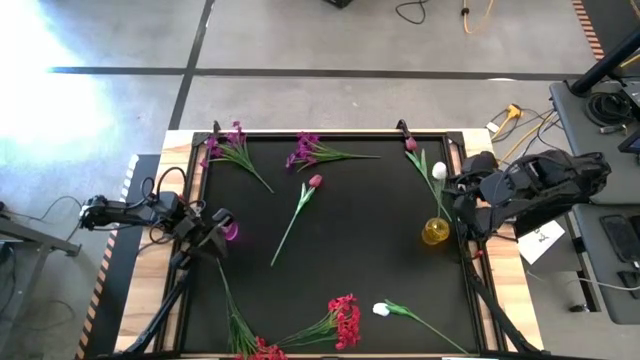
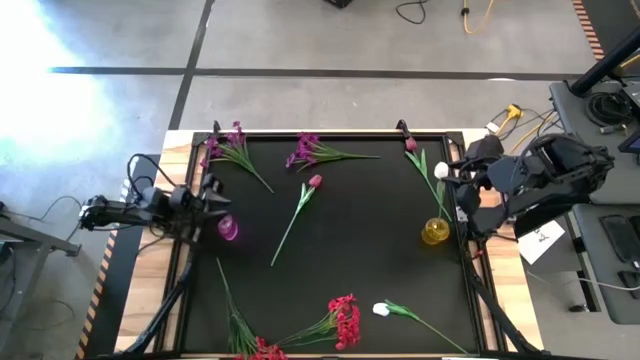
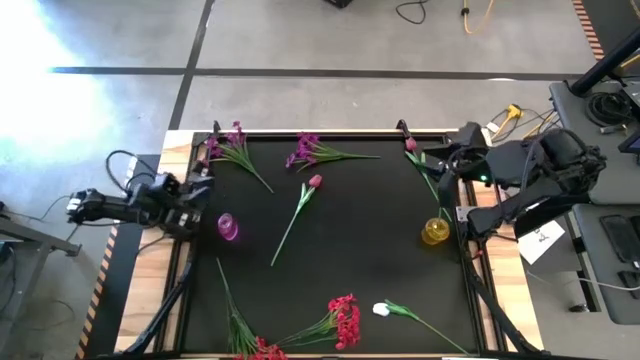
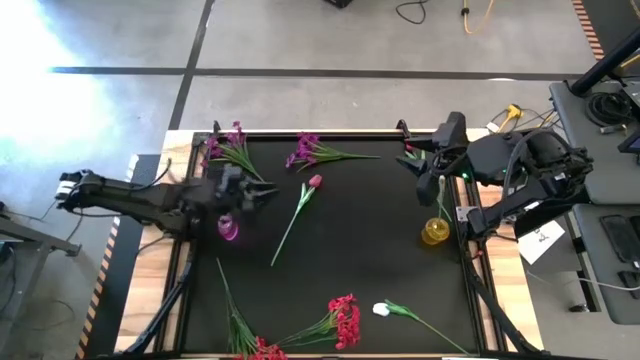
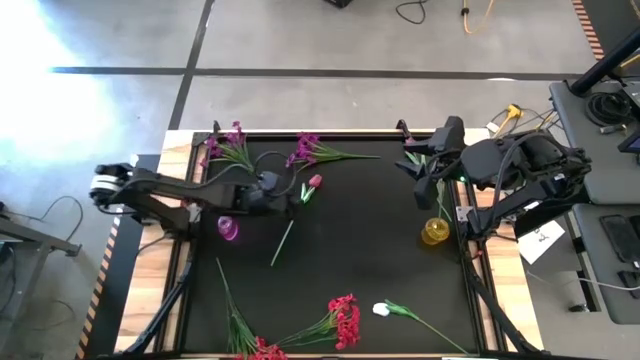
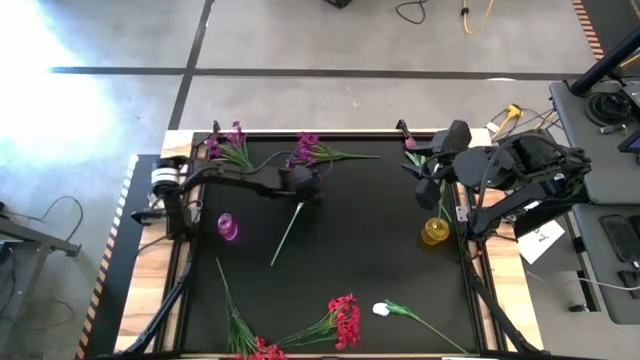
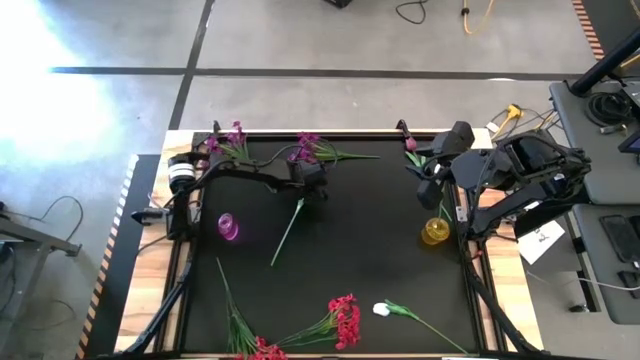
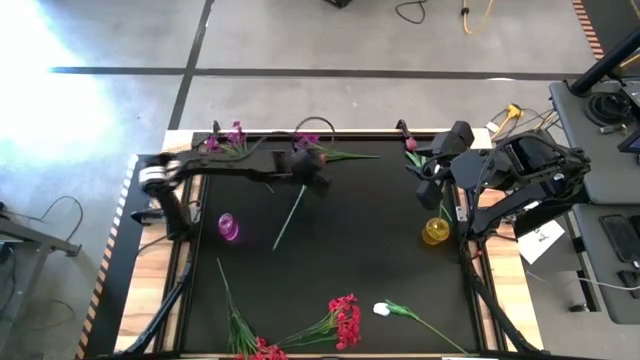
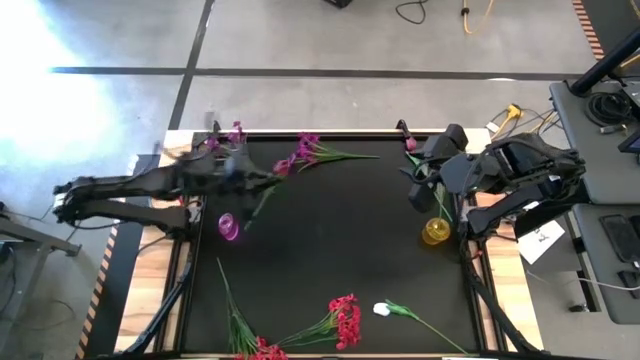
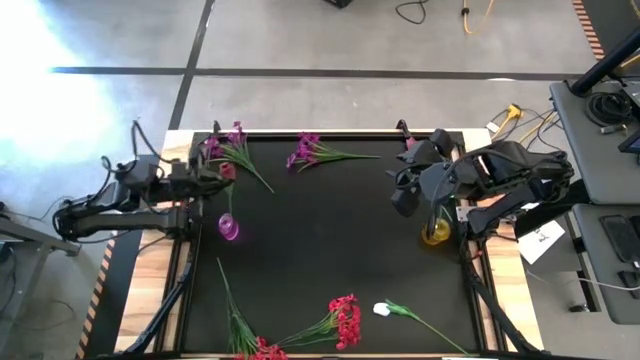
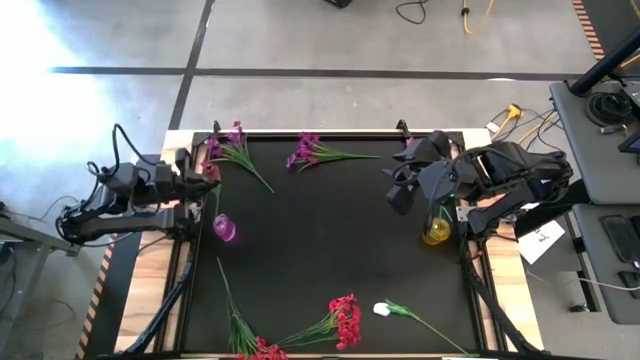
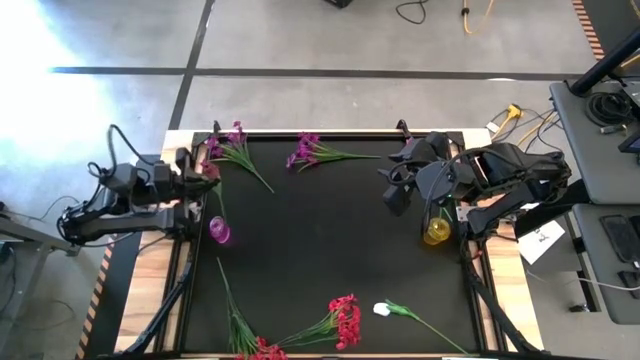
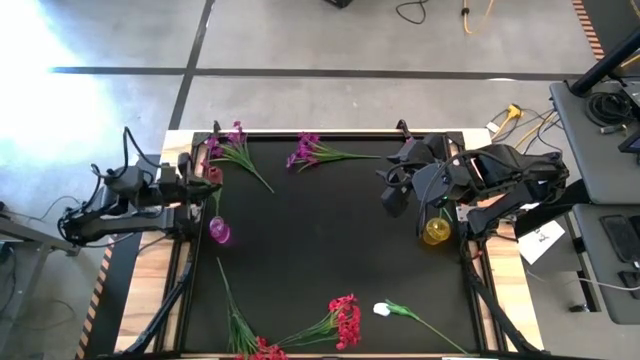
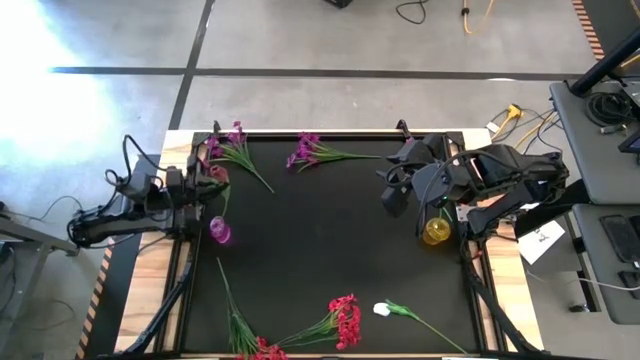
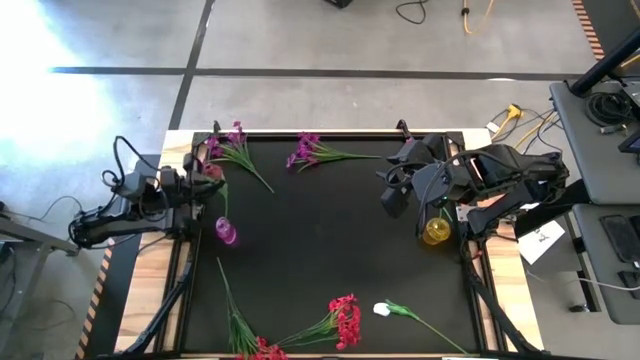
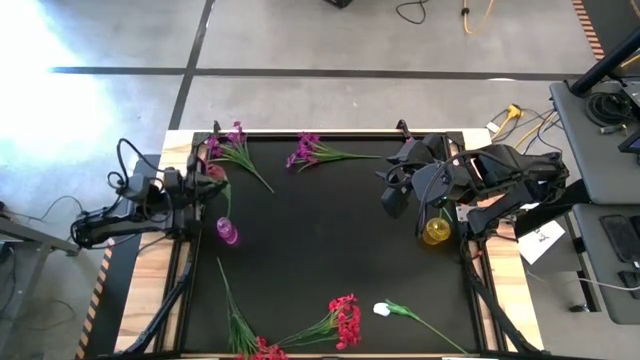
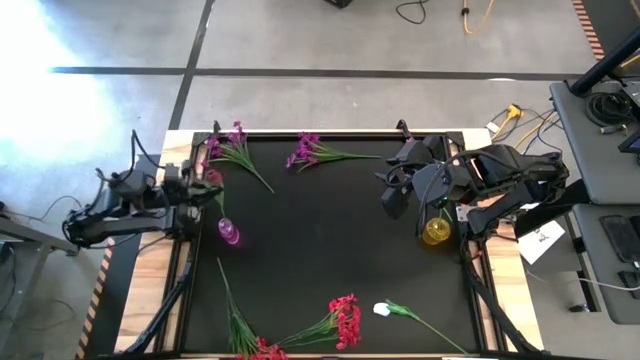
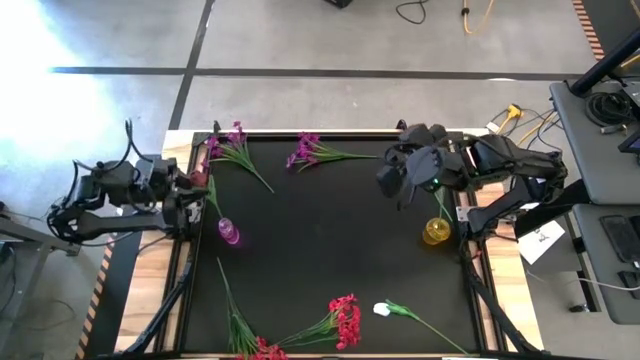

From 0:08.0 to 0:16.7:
Task: Sort flowers into vase by color
Put the left pink tulip into the violet flower vase

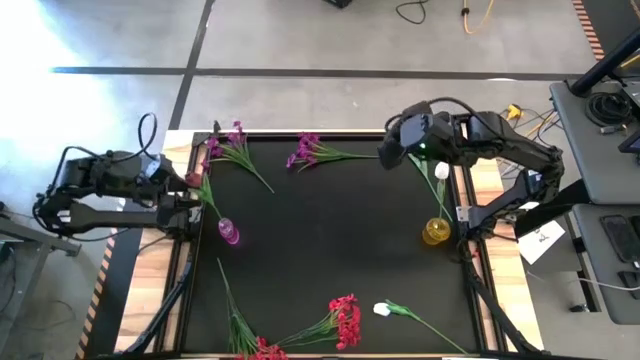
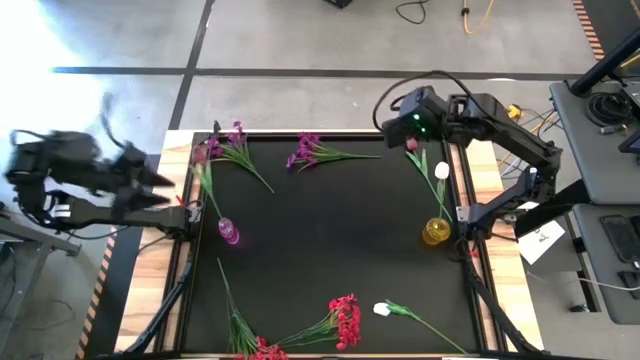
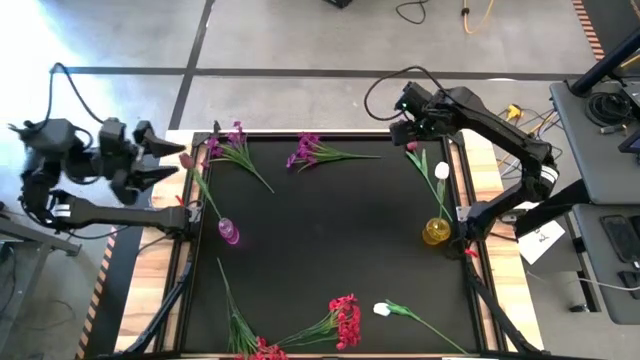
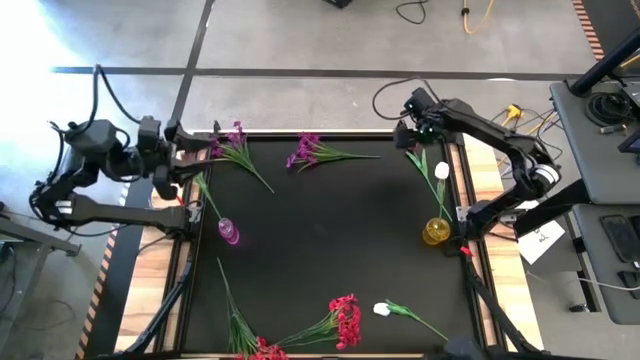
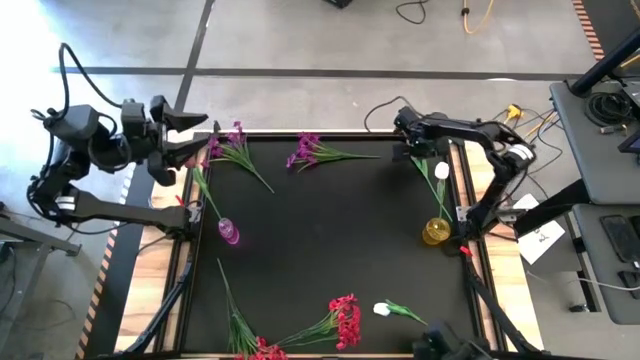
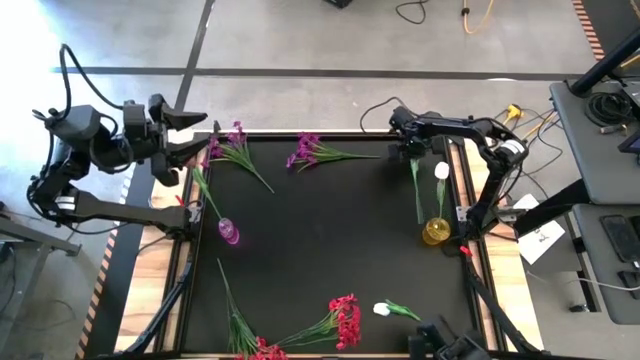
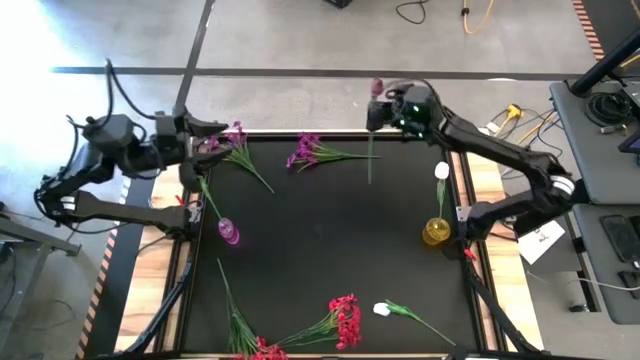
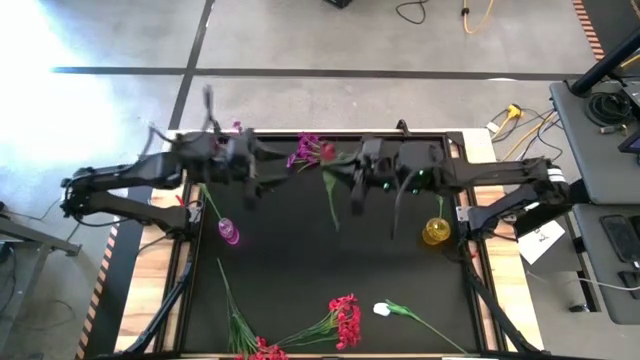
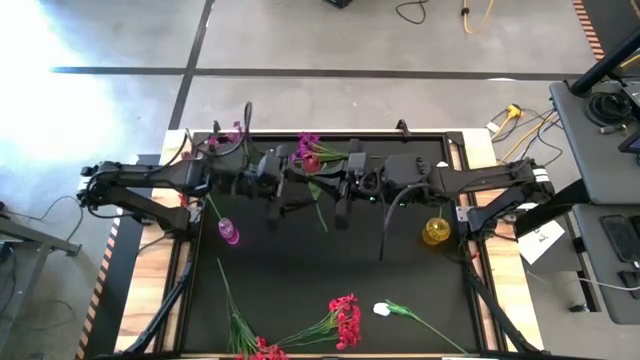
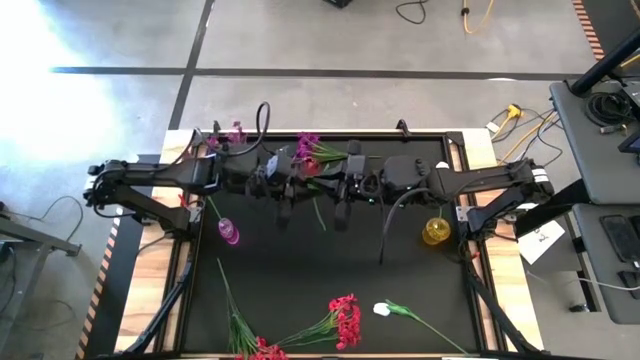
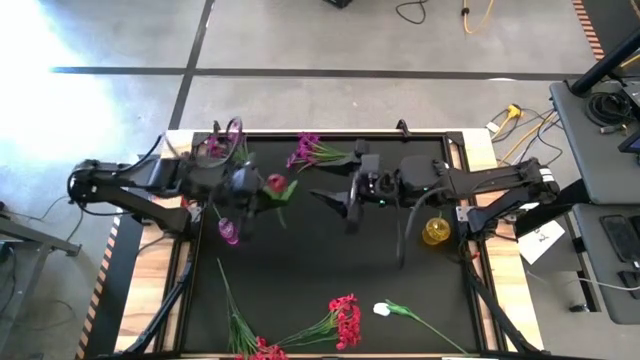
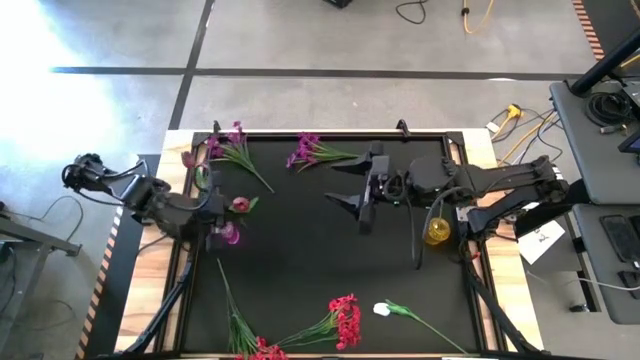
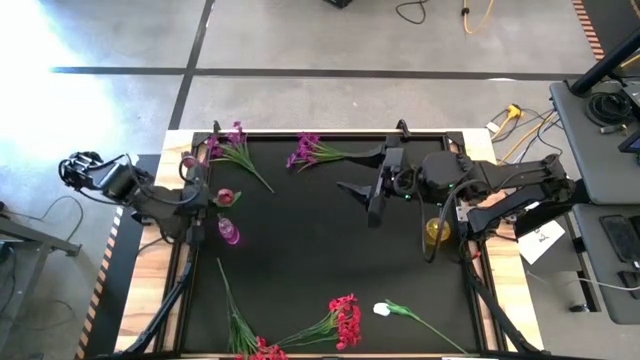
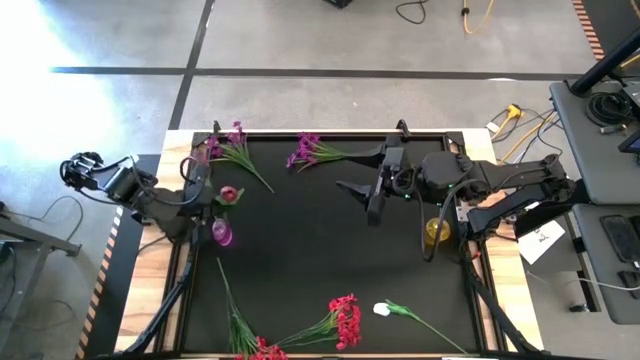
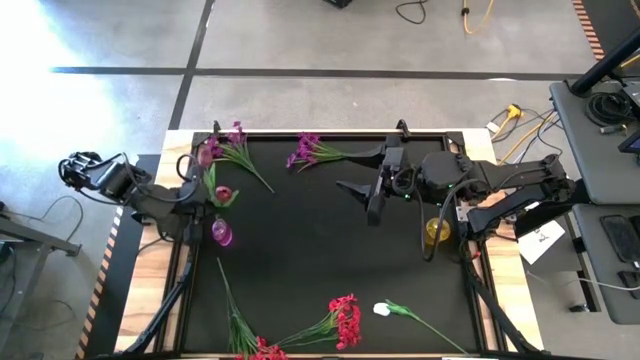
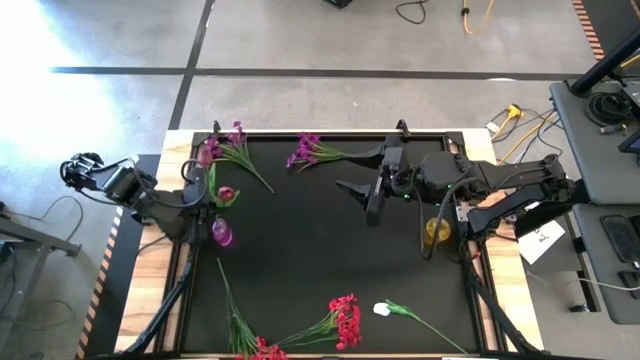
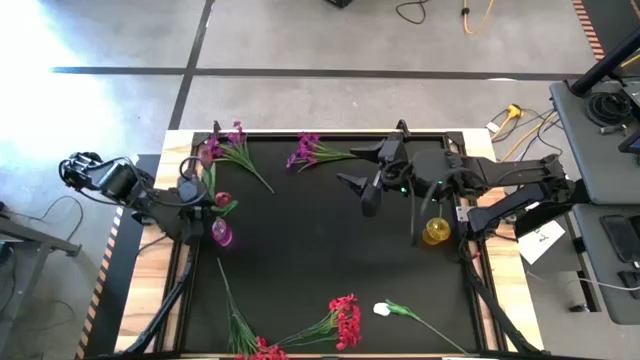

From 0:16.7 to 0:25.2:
Put the pink tulip into the violet flower vase

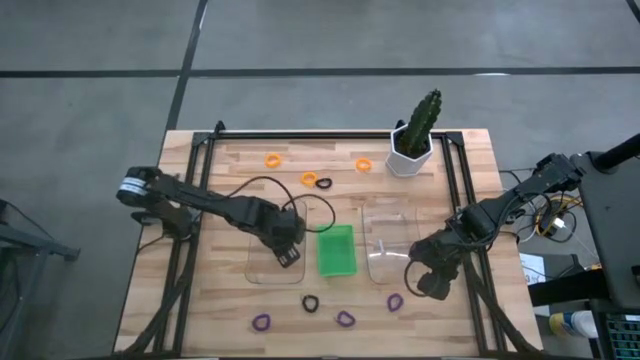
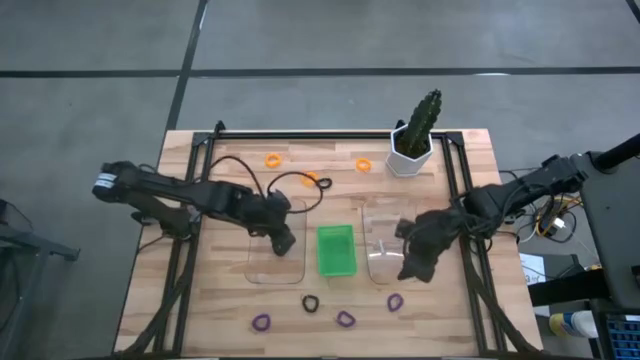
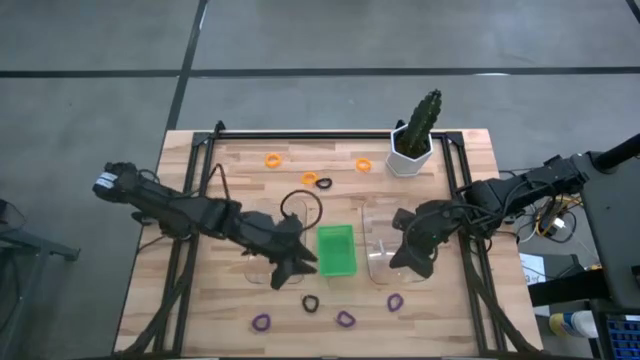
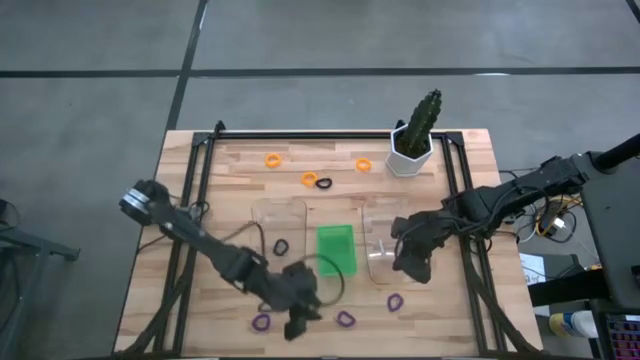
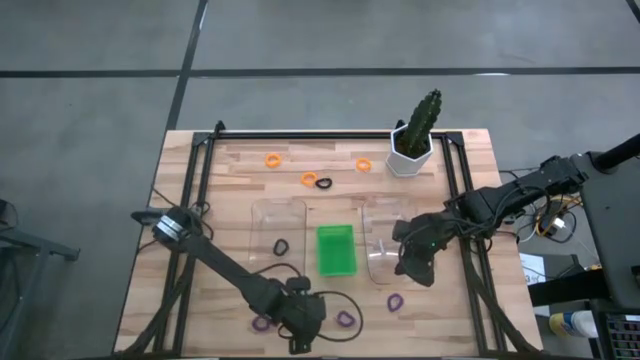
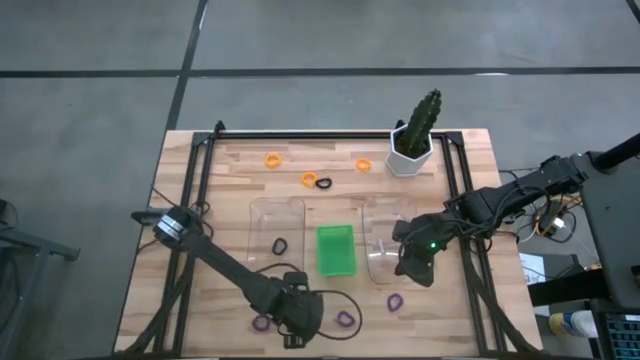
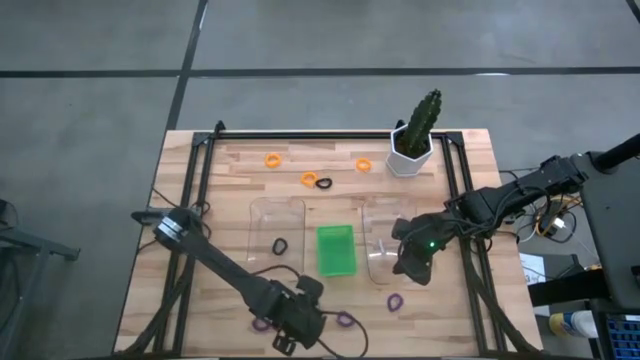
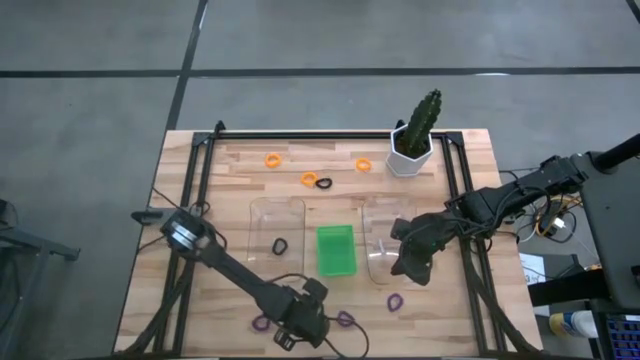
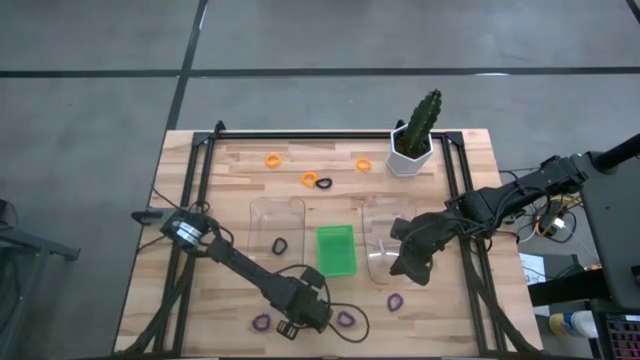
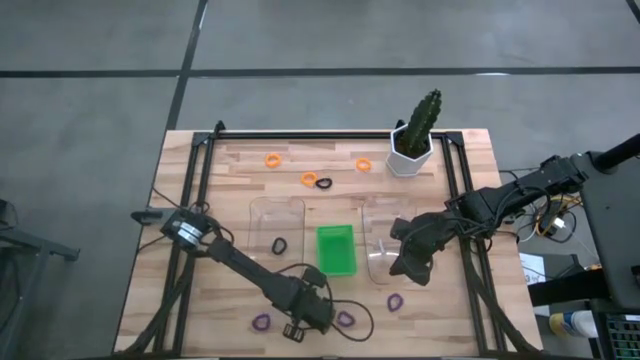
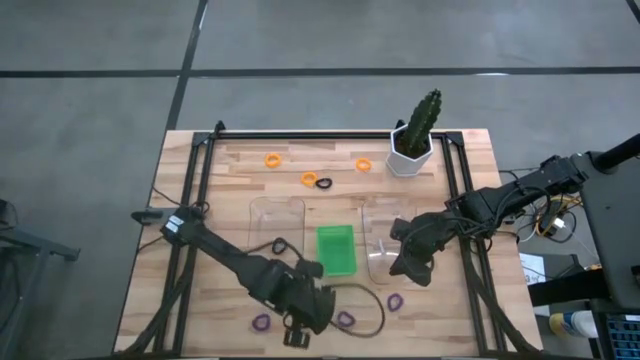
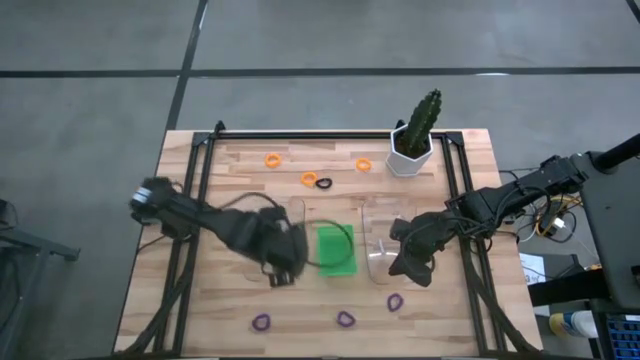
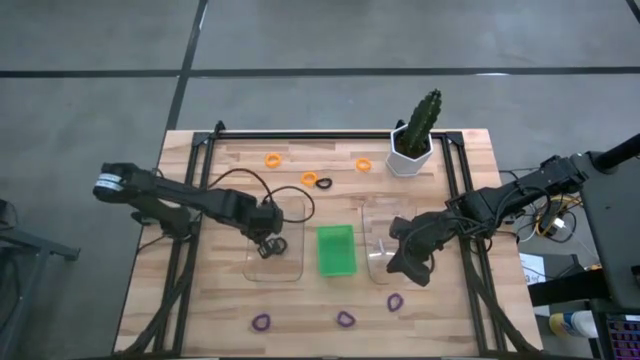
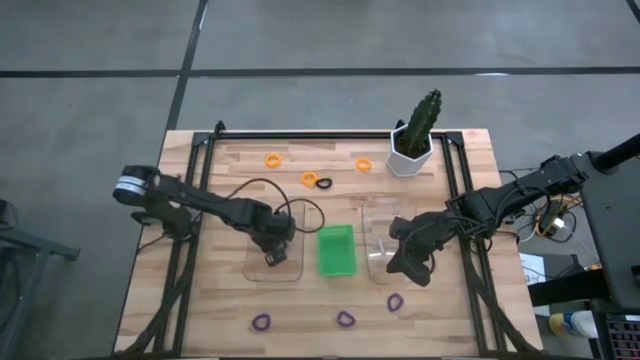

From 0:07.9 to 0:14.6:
Task: Sort spring keychains
Put the bottom black spring keychain into the left transparent bin
